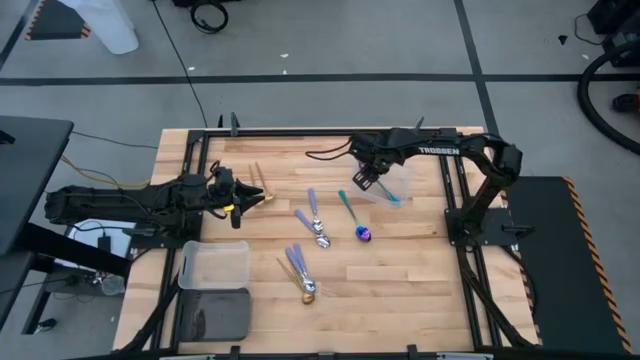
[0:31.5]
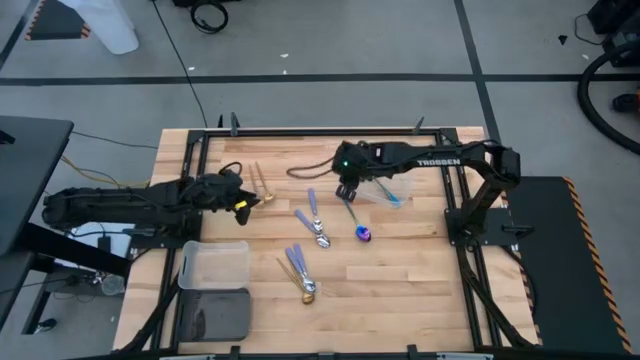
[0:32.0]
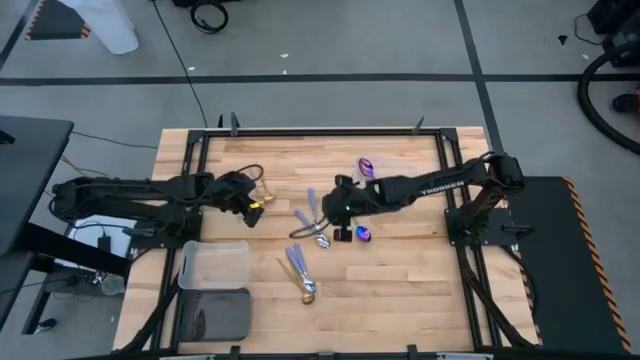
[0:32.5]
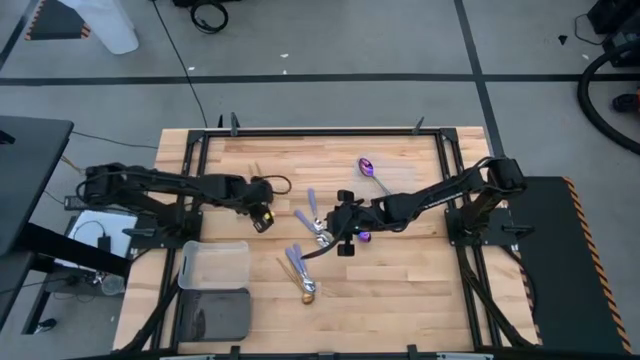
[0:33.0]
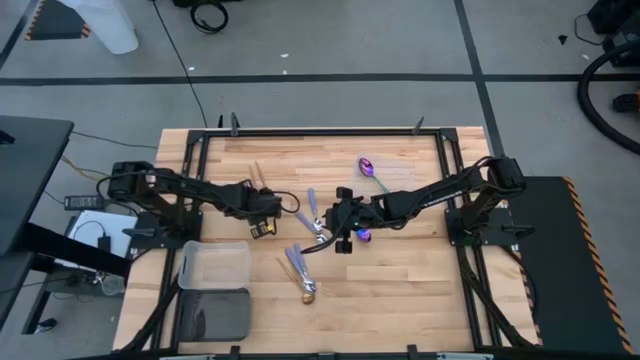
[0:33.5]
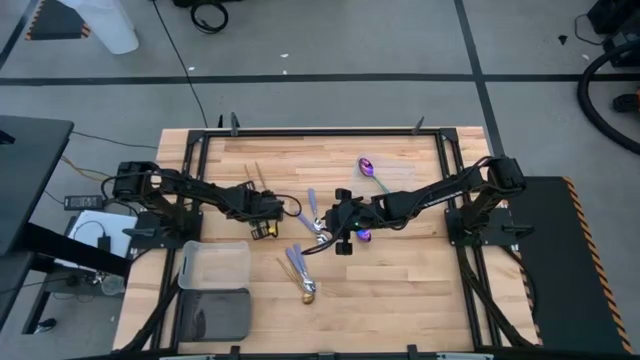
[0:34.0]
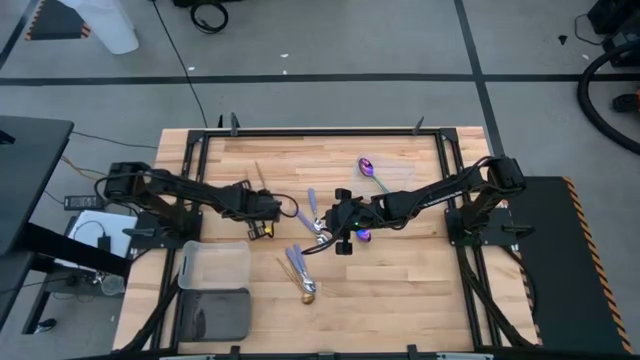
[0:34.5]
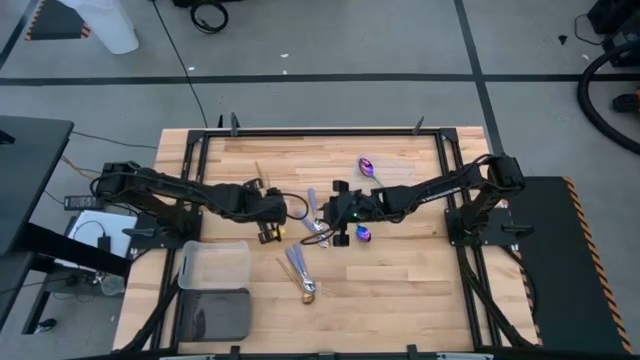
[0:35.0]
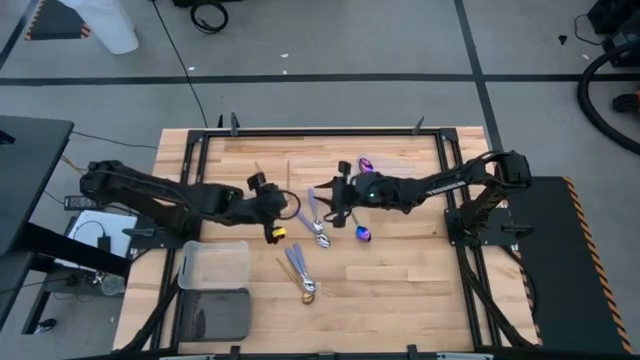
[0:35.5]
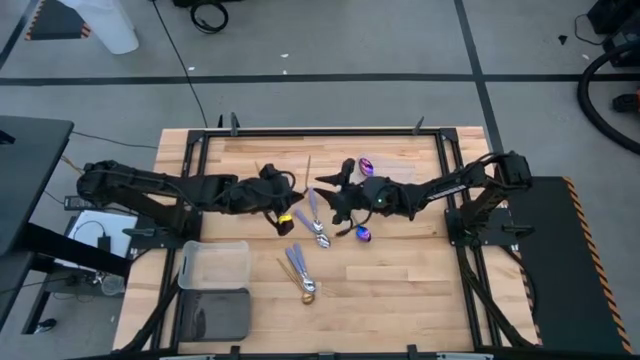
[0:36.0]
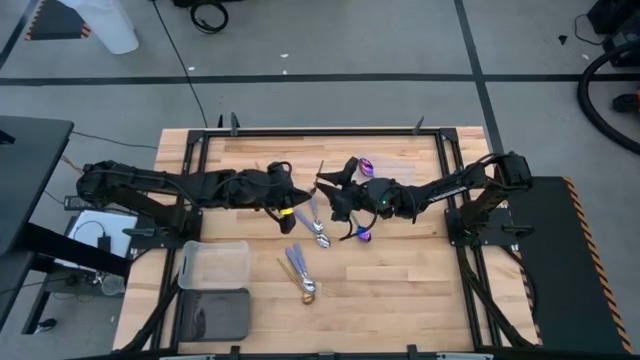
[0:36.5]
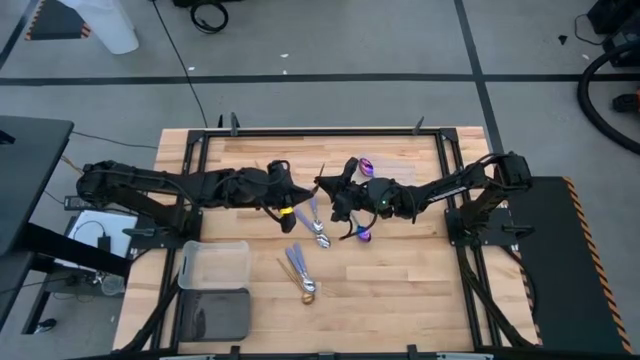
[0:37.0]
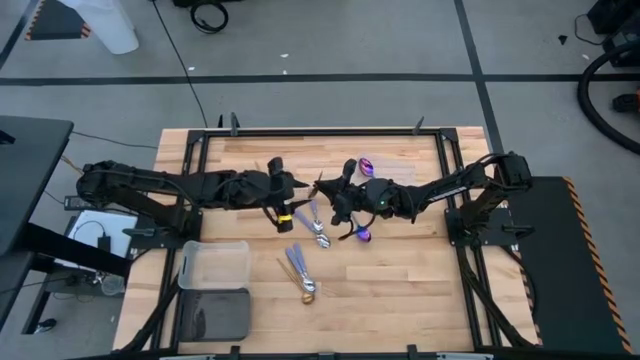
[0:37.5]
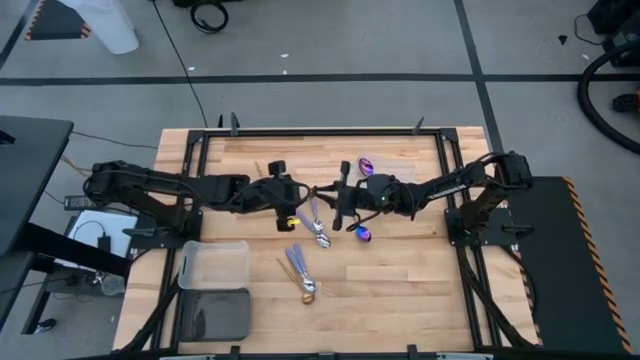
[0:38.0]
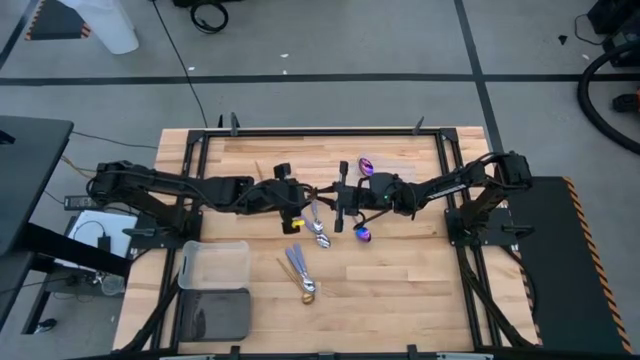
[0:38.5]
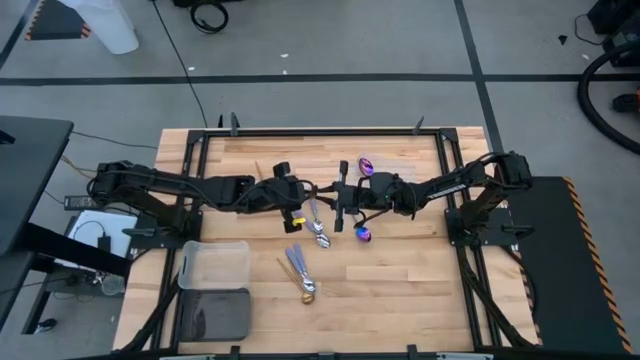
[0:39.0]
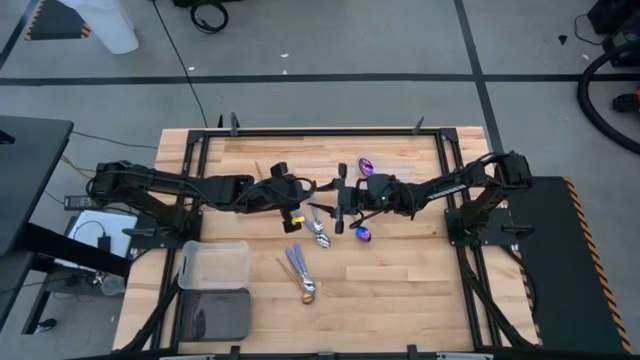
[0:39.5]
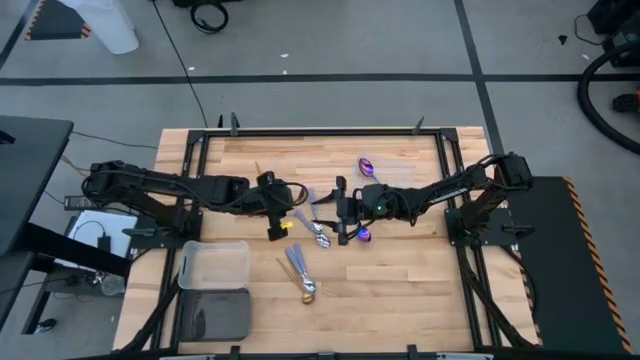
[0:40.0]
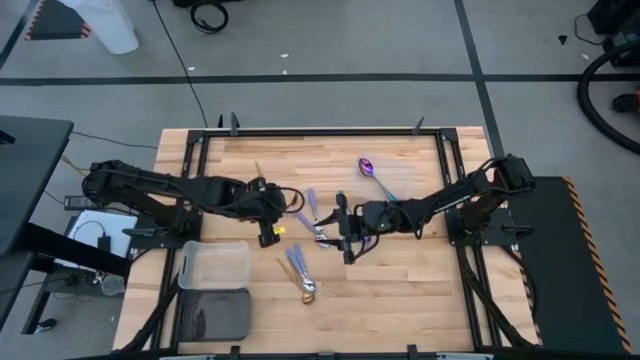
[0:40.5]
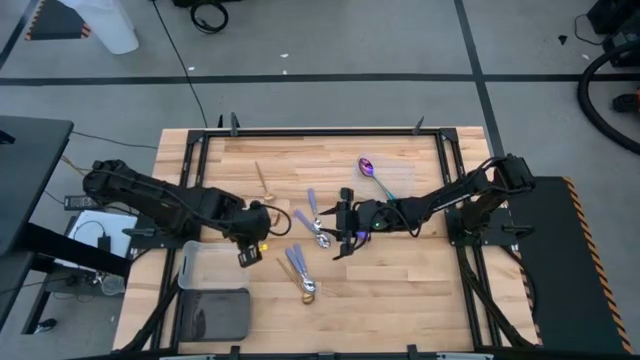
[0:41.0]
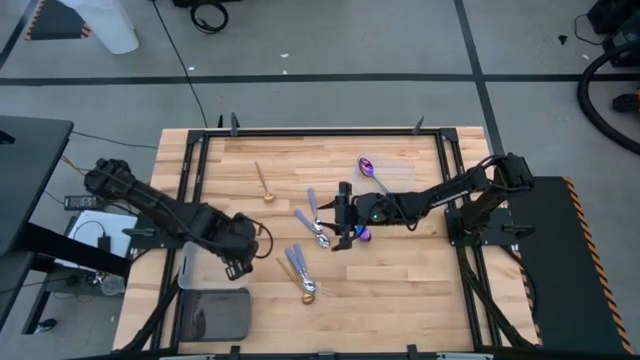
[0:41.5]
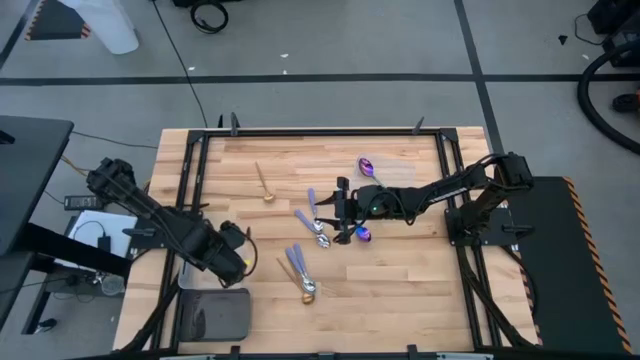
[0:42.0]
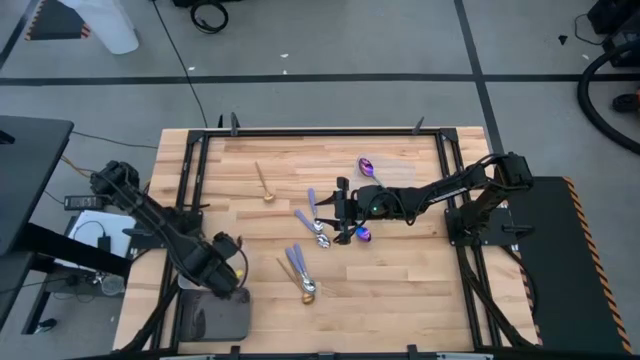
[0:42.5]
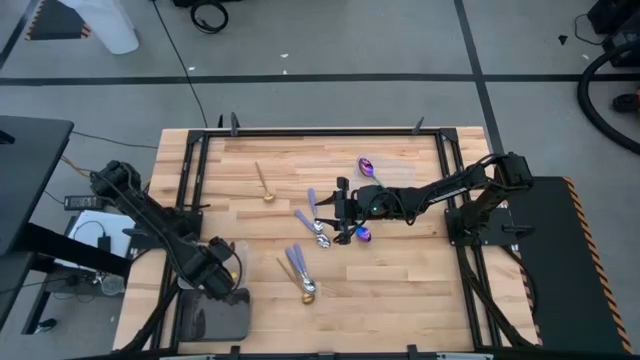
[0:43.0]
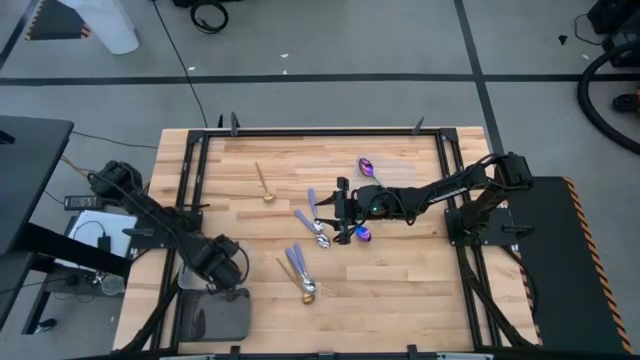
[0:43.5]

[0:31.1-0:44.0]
Task: Sort silverware by color (type)
Put the gold spoon into the bottom transparent bin

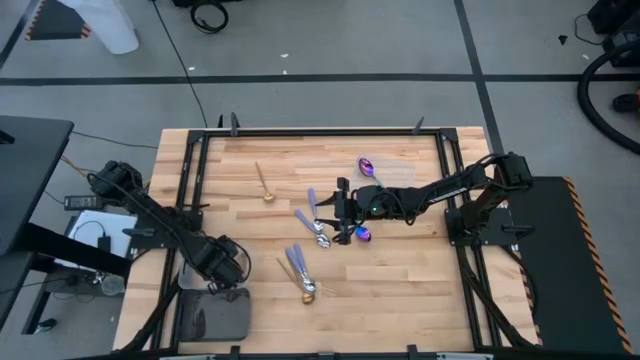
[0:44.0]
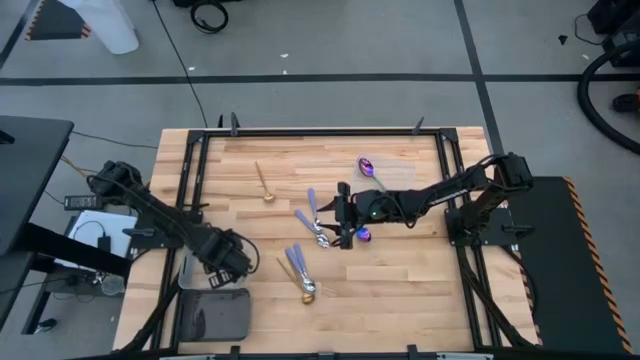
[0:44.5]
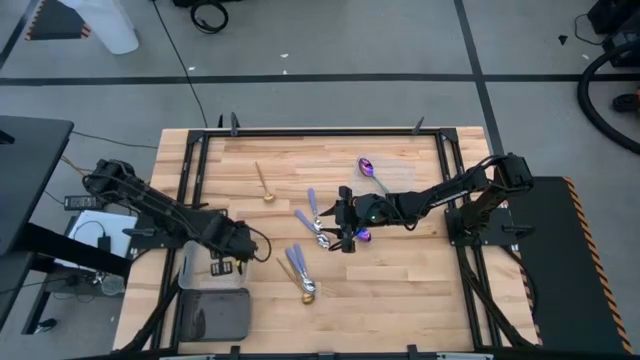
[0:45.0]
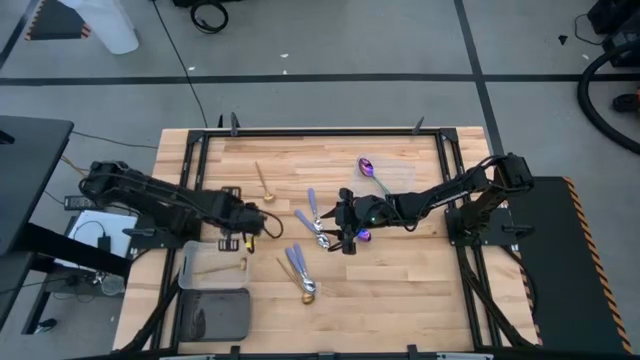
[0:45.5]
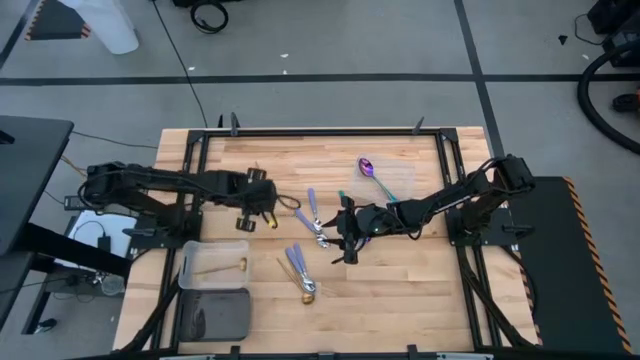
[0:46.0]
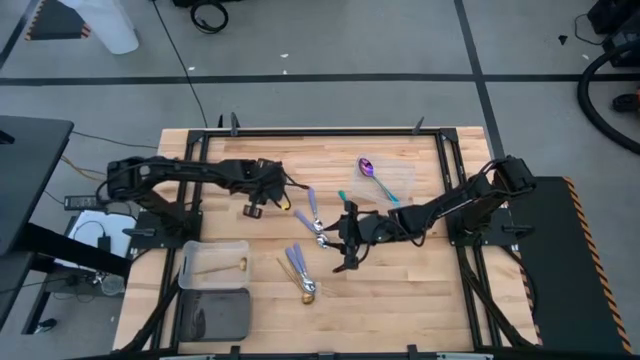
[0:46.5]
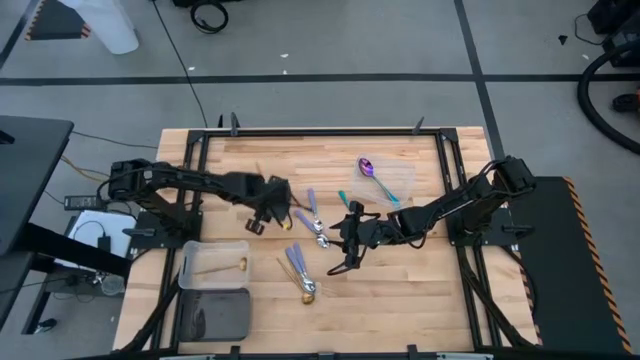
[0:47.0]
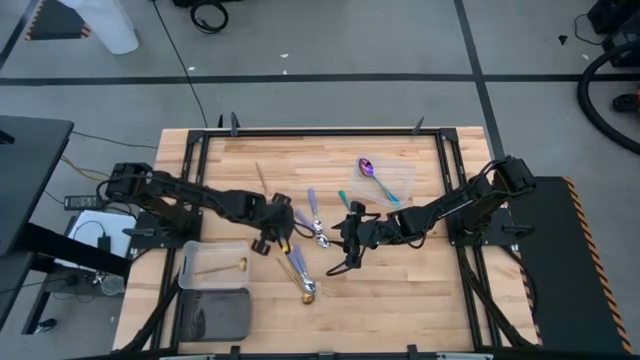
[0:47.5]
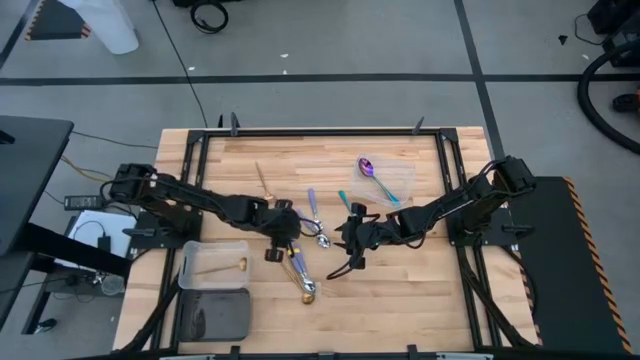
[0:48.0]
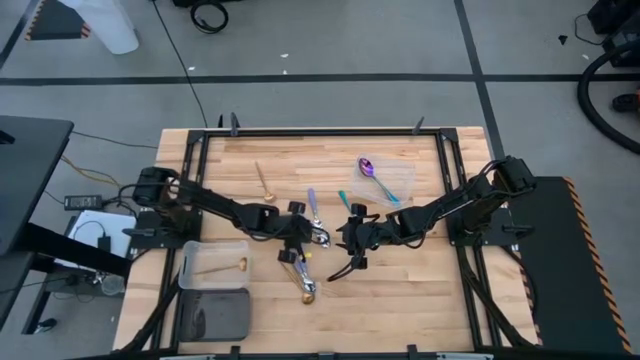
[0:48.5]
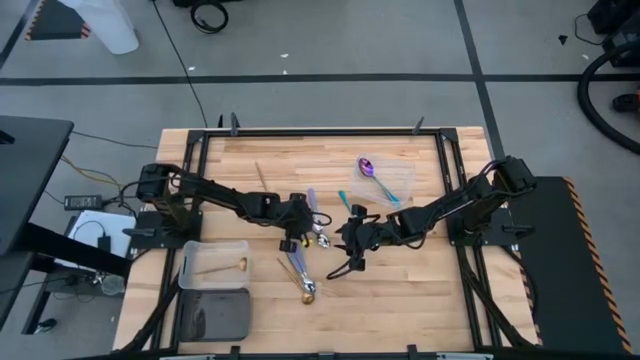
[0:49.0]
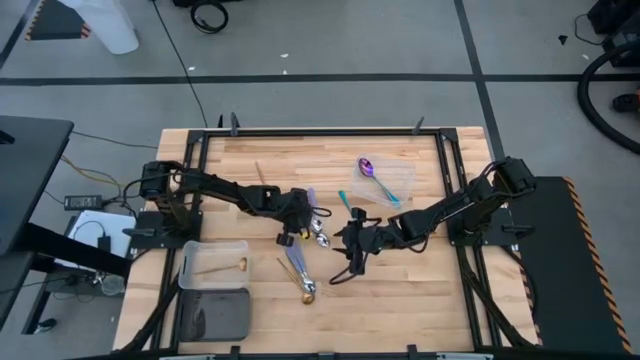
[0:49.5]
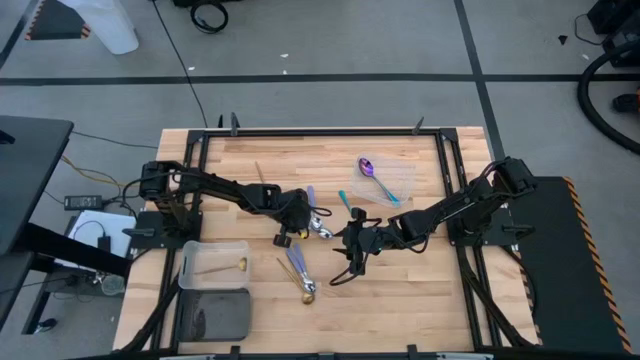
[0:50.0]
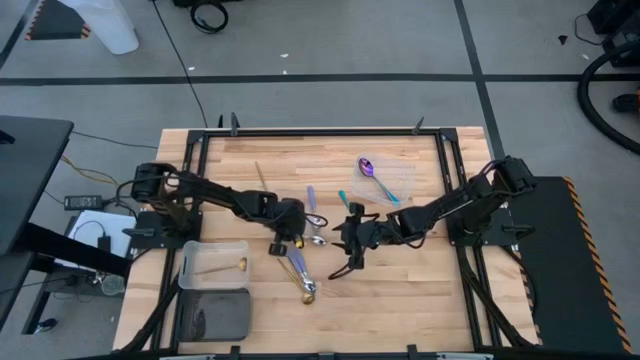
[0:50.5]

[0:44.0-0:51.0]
Put the purple spoon into the black bin

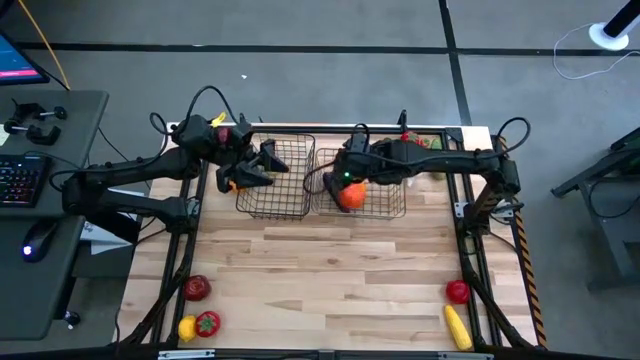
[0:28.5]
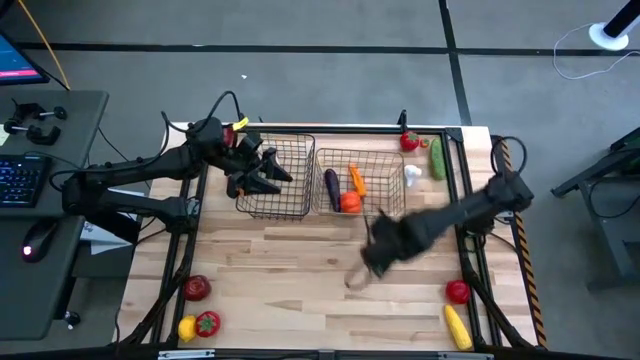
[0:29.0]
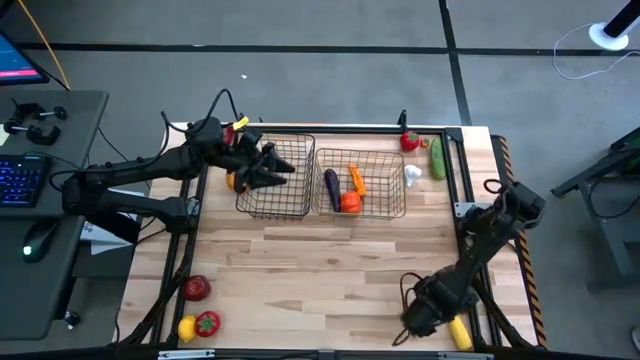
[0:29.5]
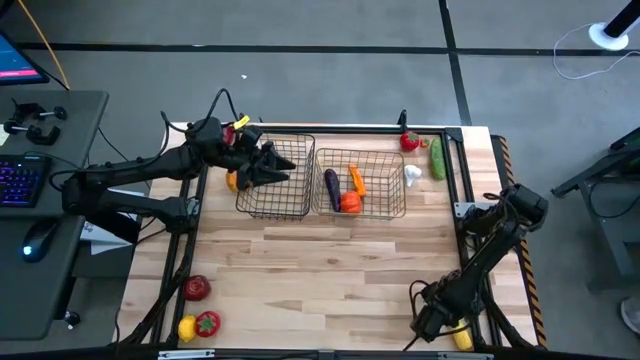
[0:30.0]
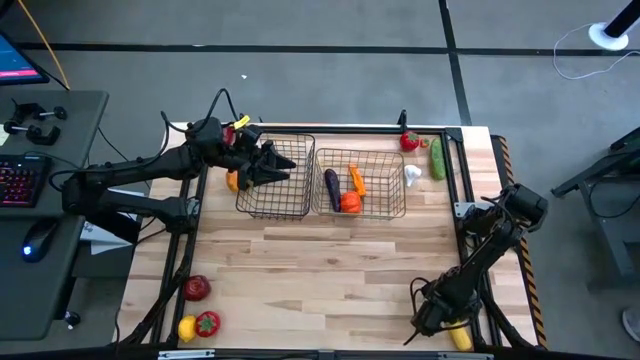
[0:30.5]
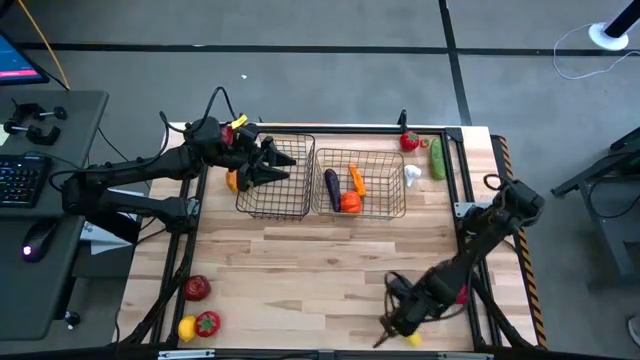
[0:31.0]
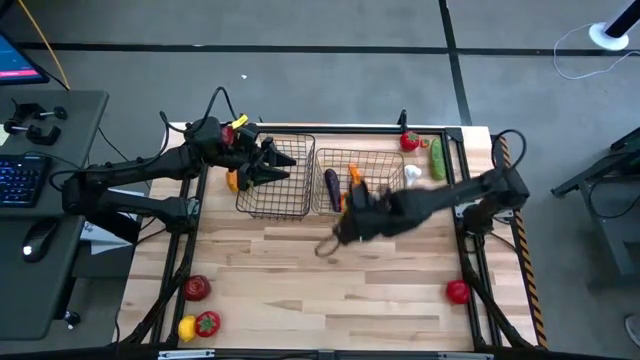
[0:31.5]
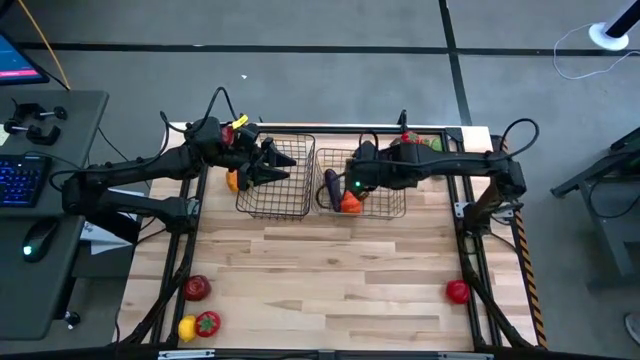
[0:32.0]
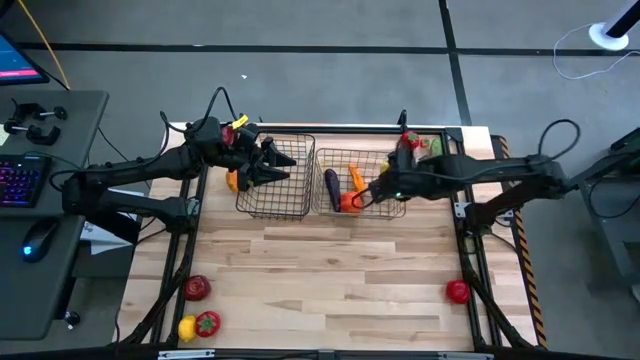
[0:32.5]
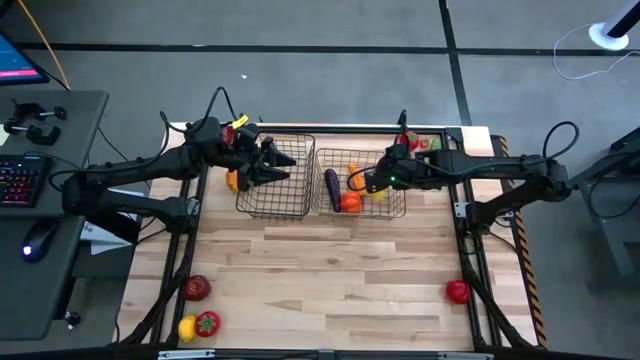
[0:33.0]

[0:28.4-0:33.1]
Task: Sort produce into baskets
Put the corn into the right wire basket
